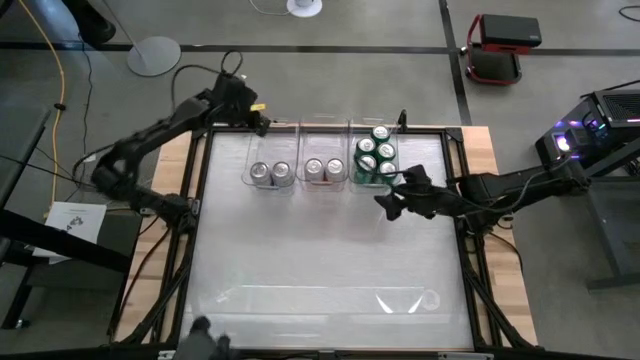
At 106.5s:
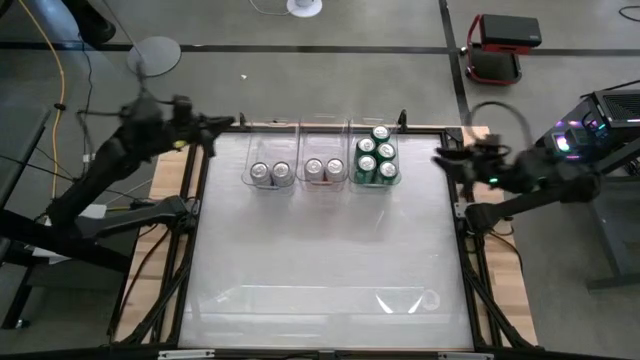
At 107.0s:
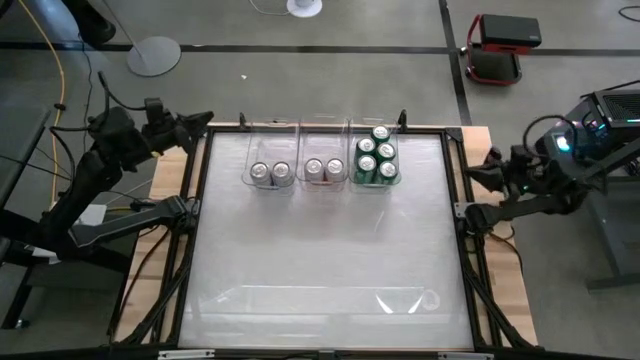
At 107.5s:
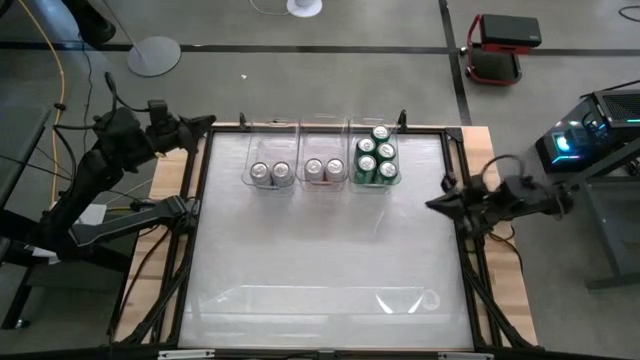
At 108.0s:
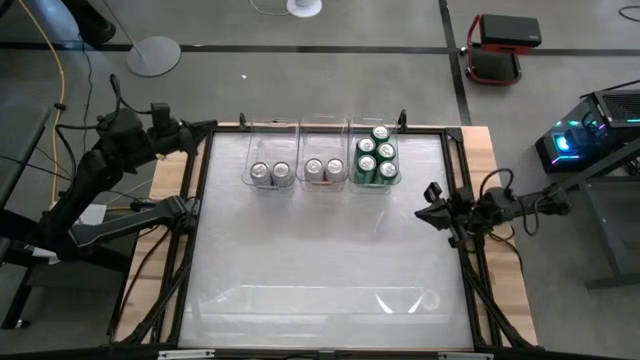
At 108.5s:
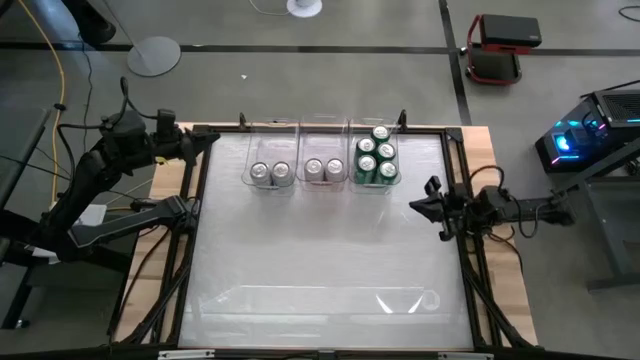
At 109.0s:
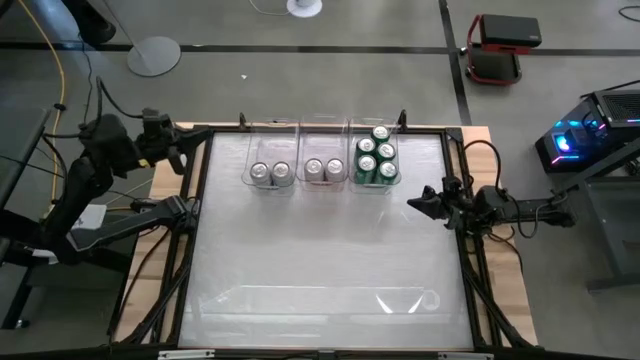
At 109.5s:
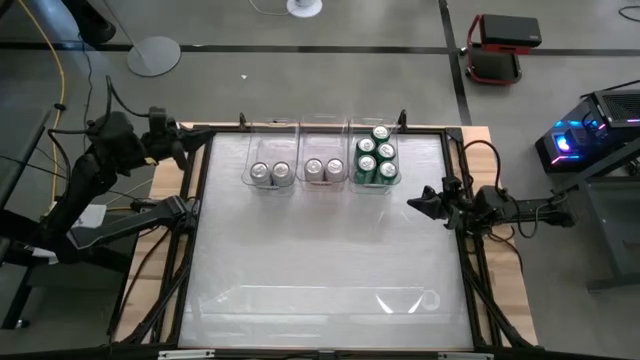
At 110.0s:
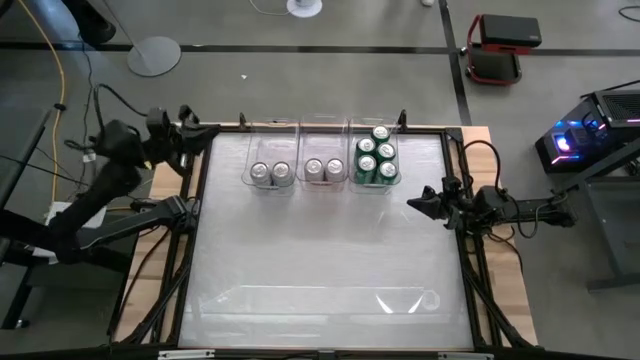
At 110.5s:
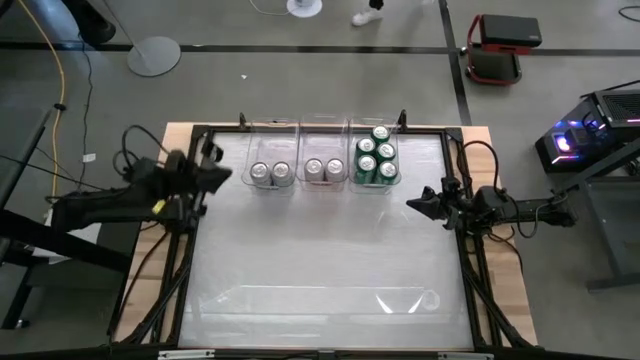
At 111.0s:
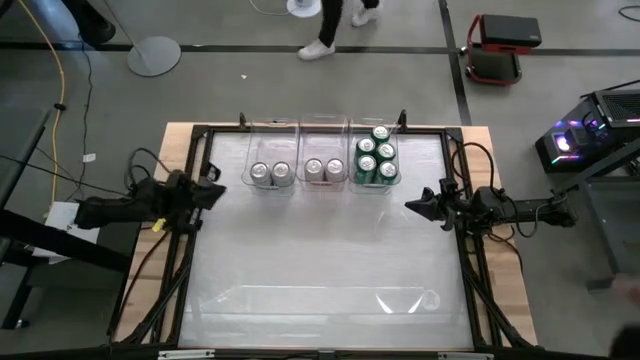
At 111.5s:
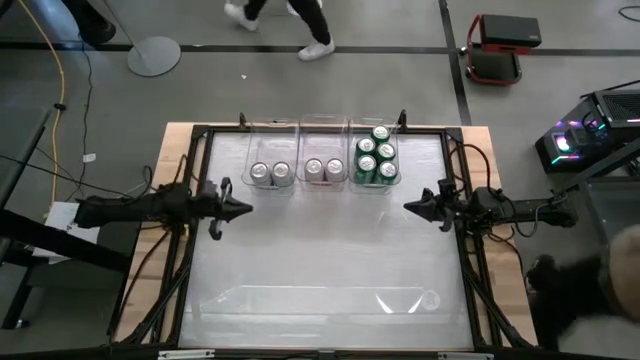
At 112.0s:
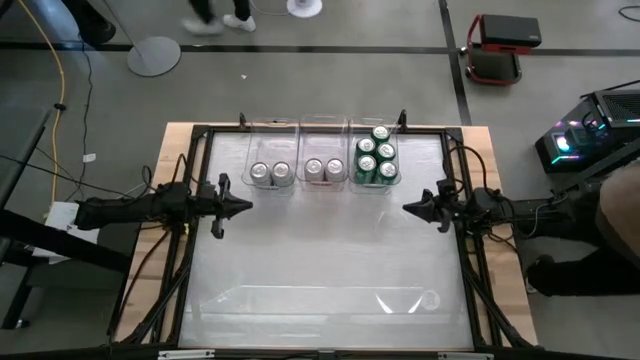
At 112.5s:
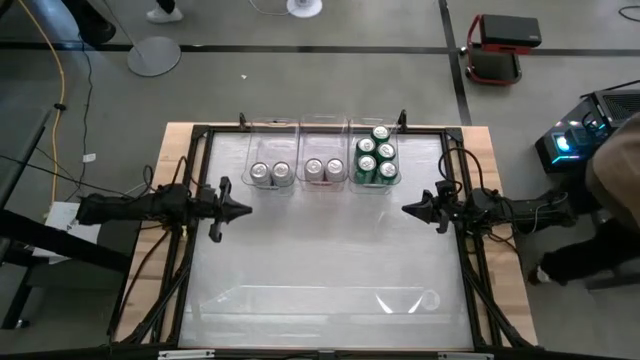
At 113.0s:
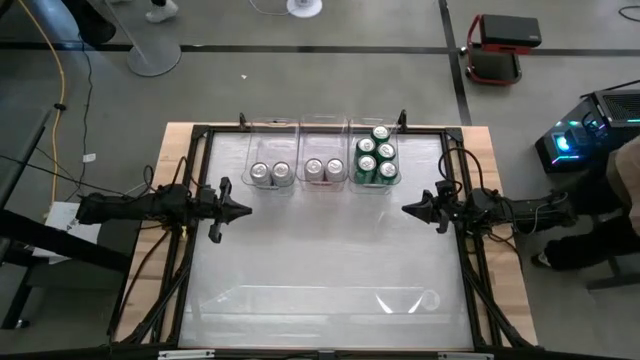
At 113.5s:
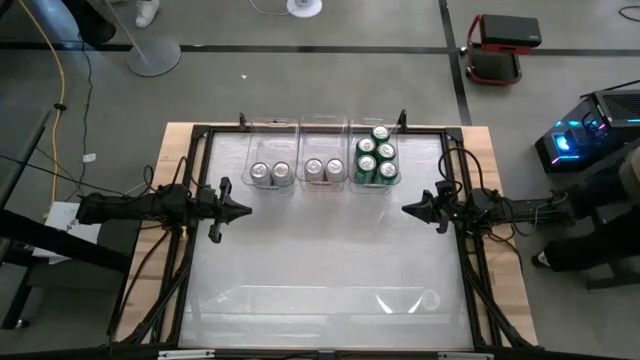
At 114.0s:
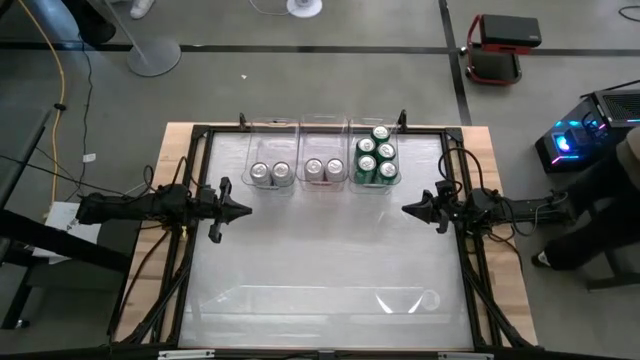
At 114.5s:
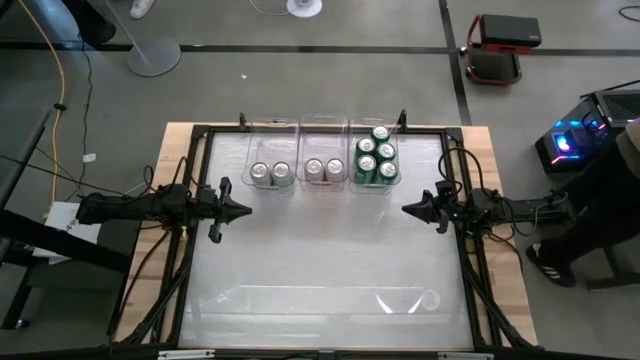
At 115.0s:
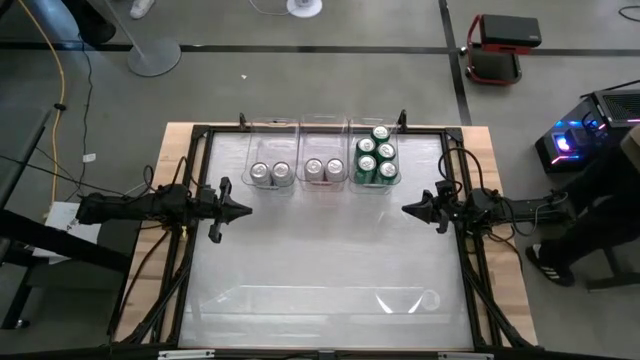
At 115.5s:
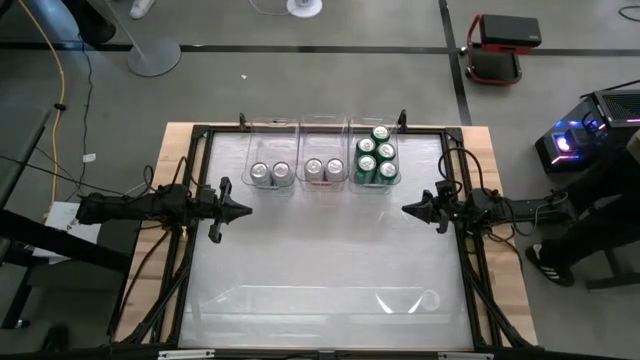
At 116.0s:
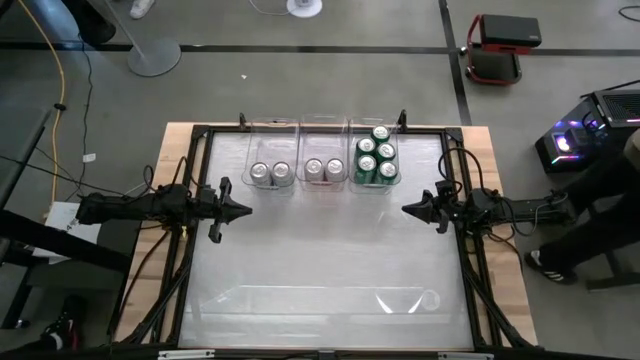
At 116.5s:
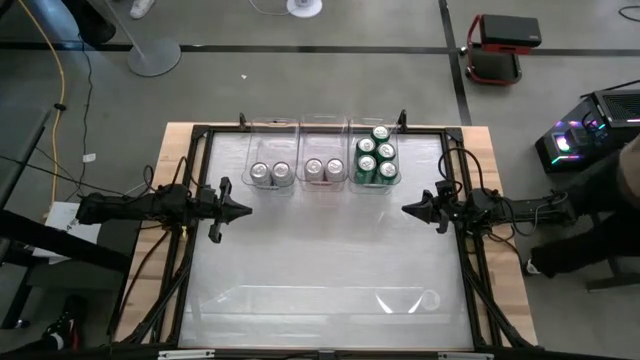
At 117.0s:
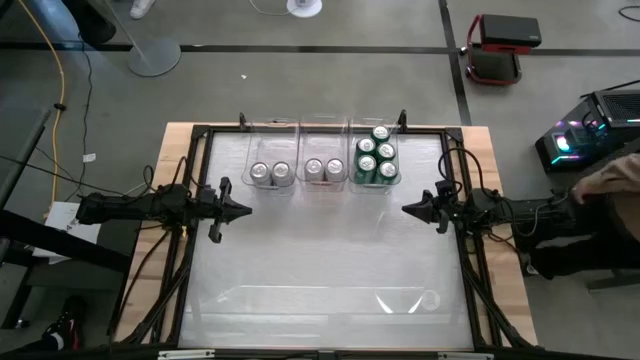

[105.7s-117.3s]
Task: Sort soda cans
Return to Home Position

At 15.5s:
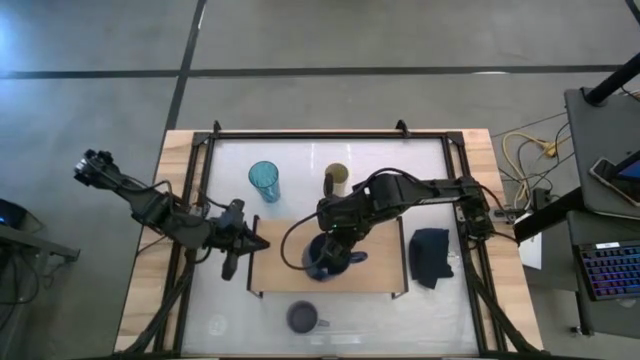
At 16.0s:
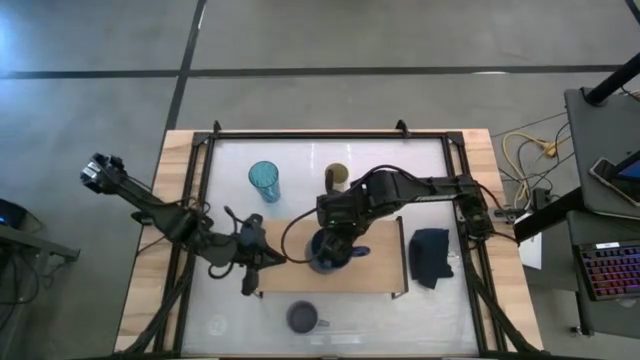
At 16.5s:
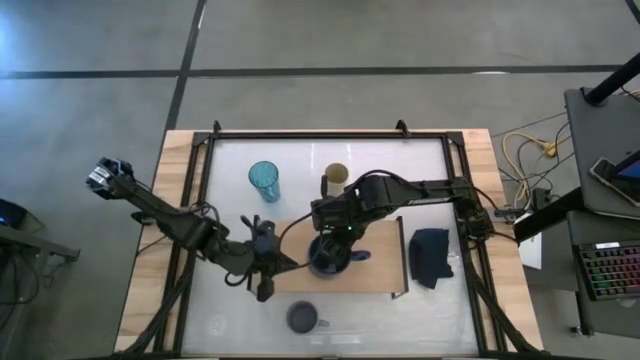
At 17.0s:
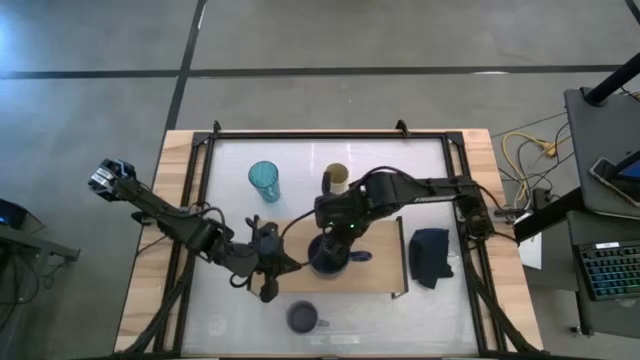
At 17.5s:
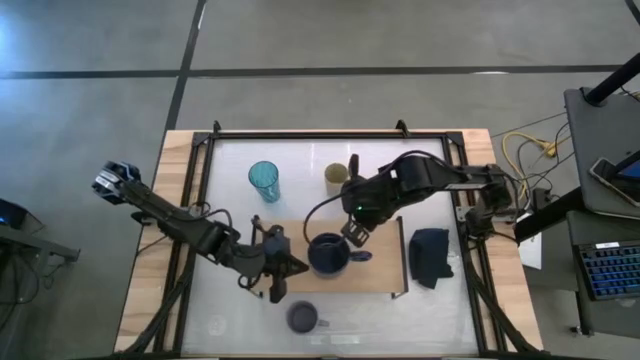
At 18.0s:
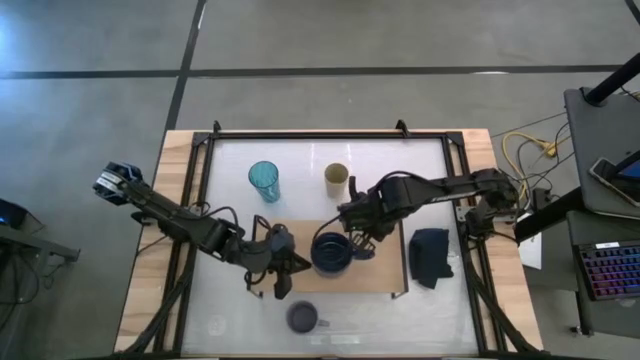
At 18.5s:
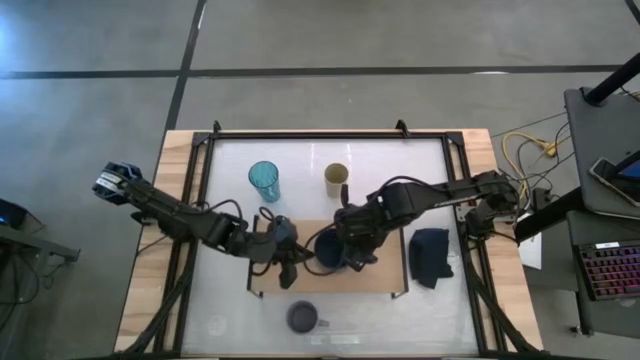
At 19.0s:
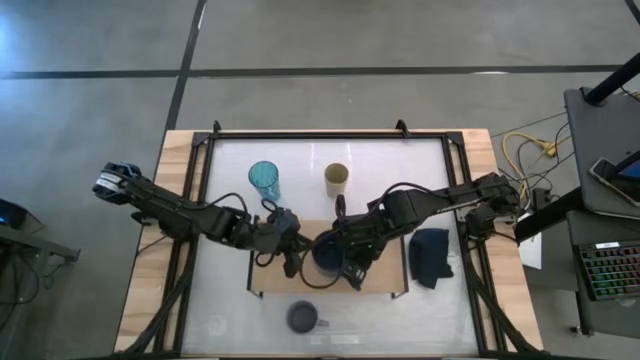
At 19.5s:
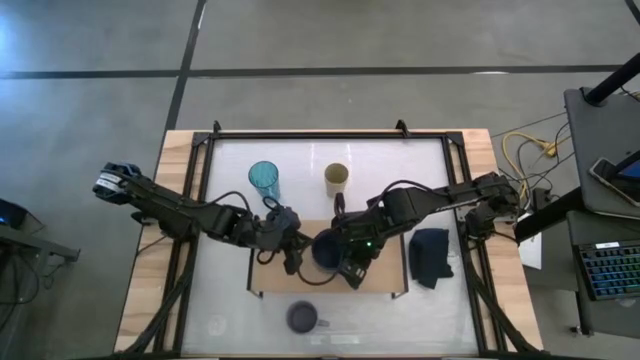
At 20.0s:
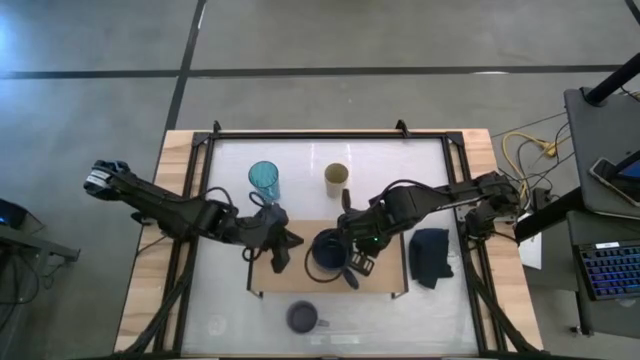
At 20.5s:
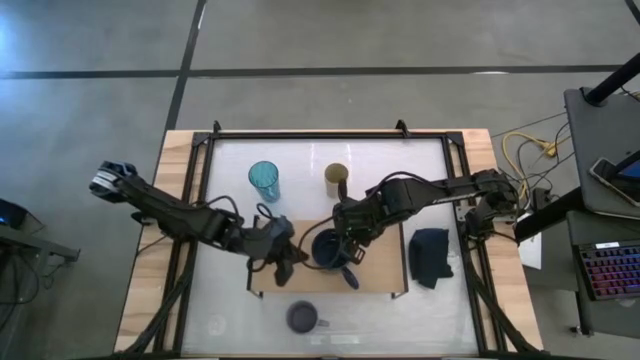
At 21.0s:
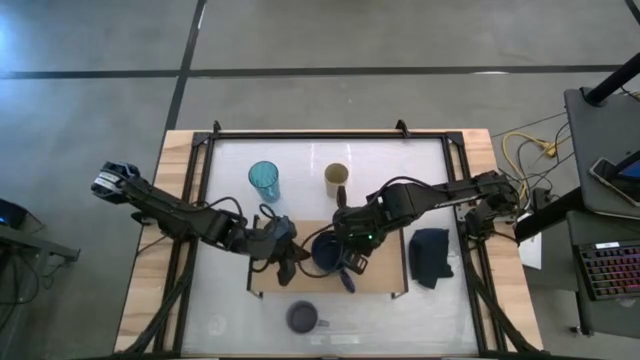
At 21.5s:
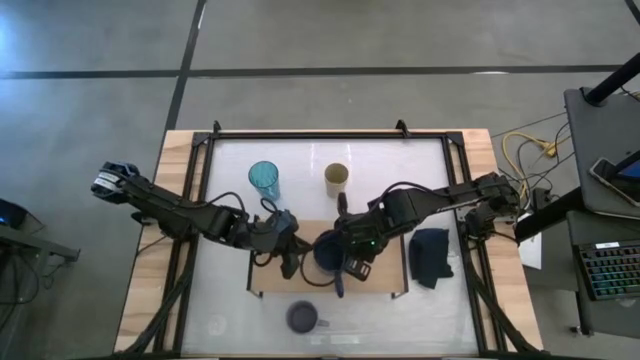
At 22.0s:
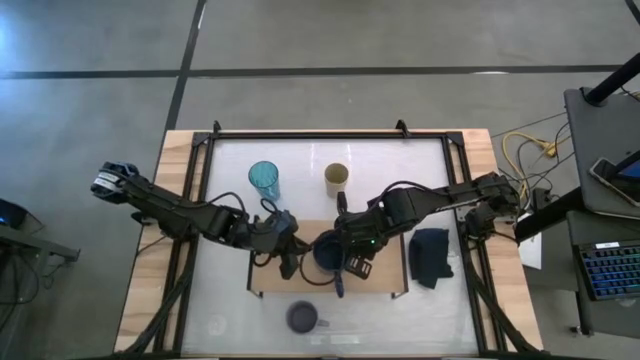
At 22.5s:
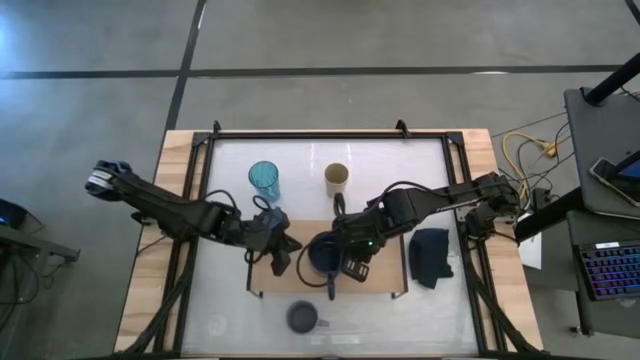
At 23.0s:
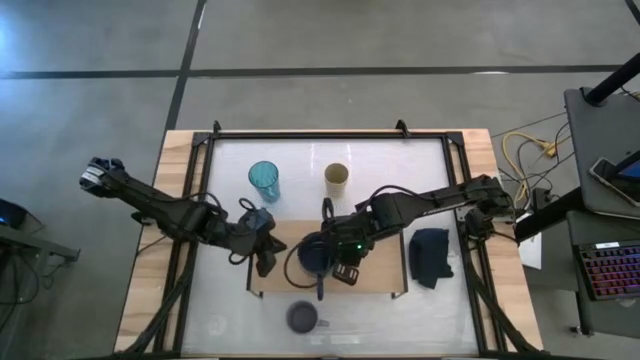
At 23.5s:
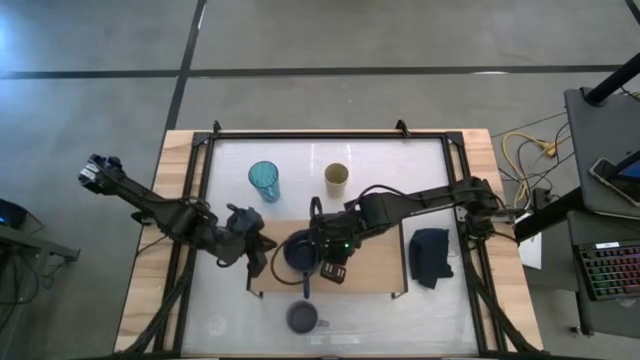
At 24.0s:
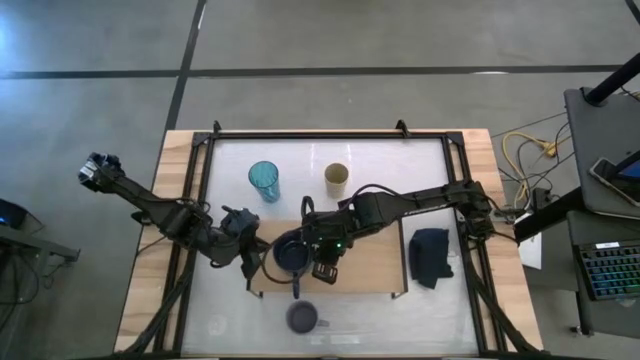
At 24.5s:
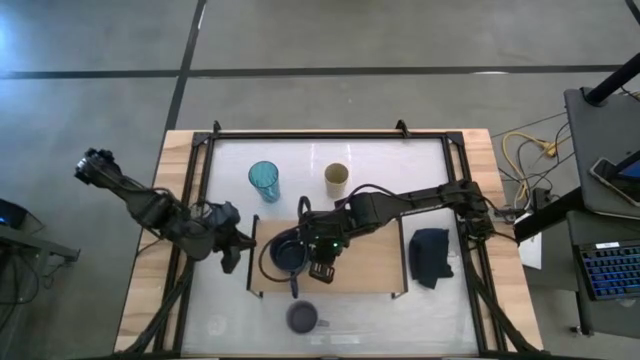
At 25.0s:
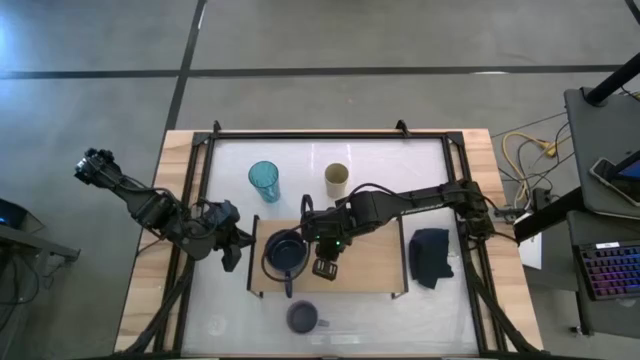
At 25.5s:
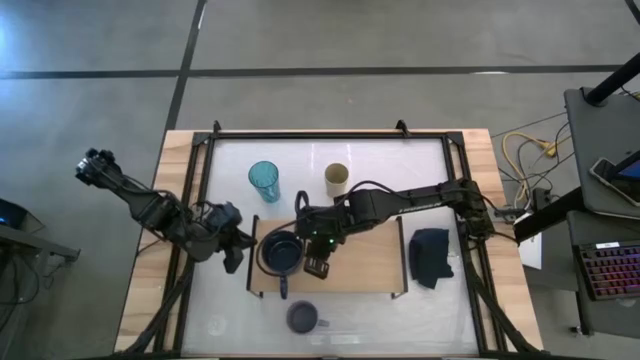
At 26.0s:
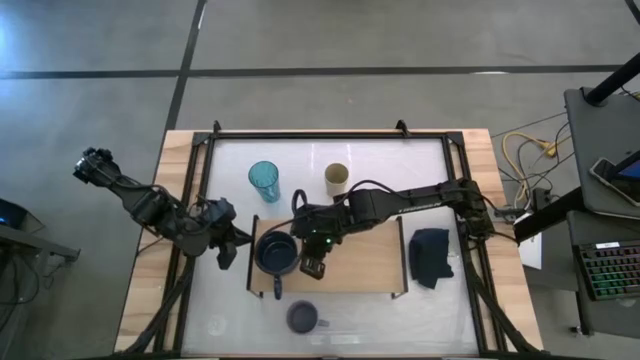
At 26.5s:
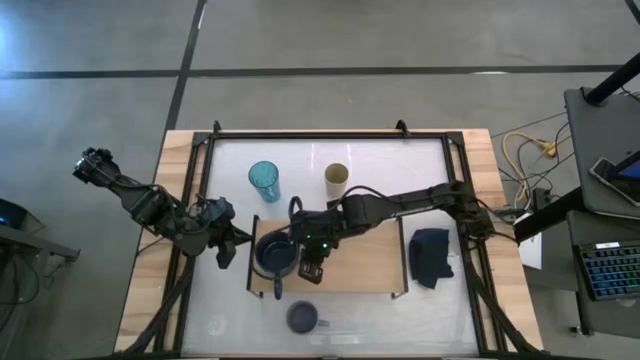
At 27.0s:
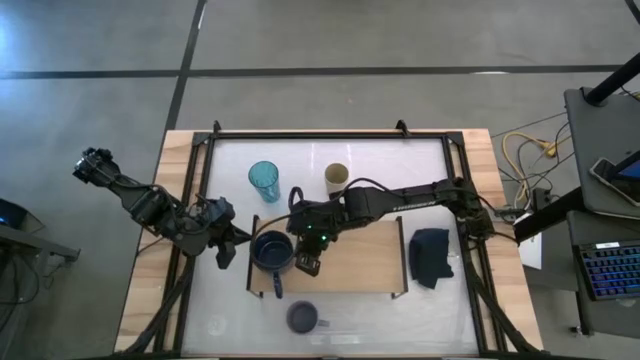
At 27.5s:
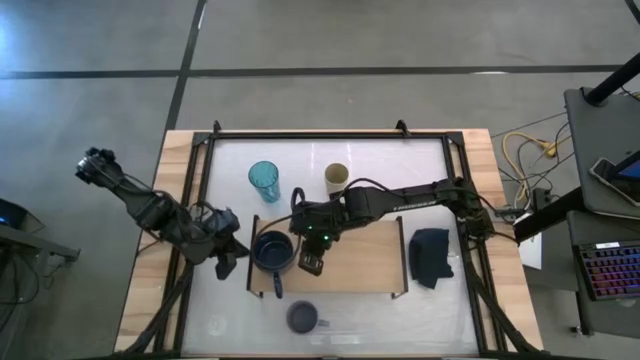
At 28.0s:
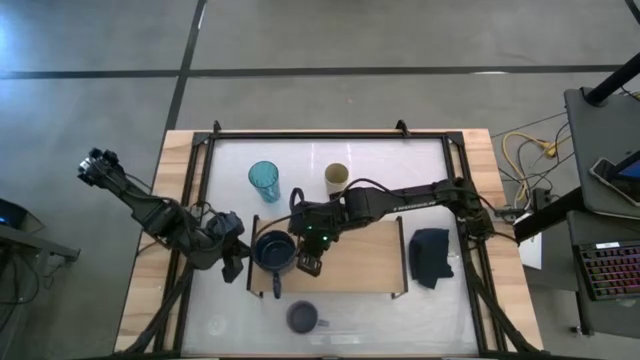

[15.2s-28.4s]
Task: Stack small to large cups/mugs on shelf
Put the blue mug on the shelf
